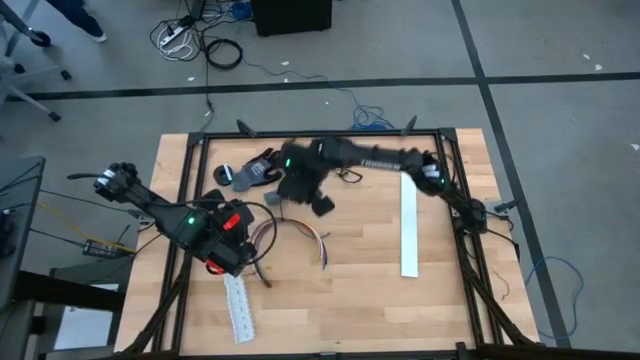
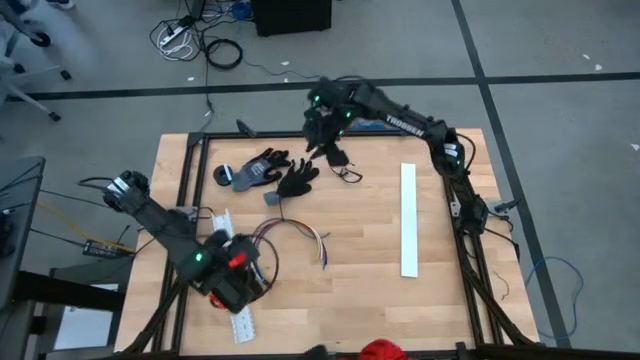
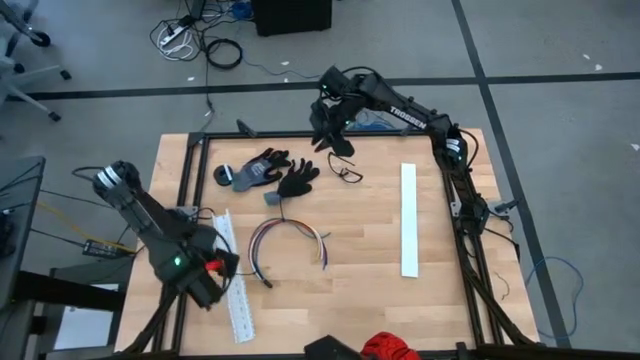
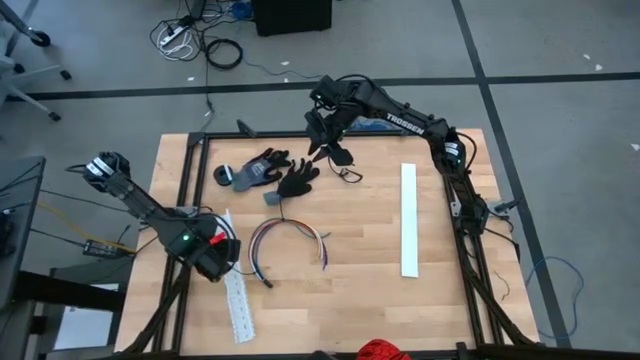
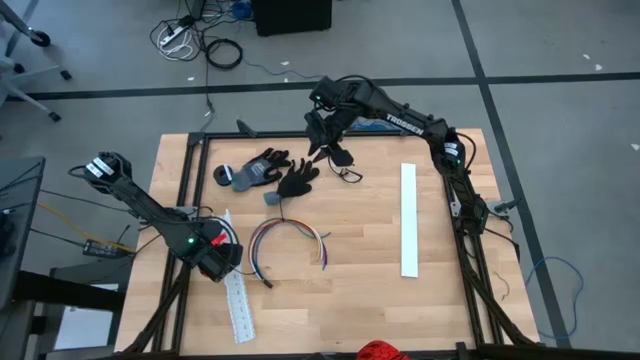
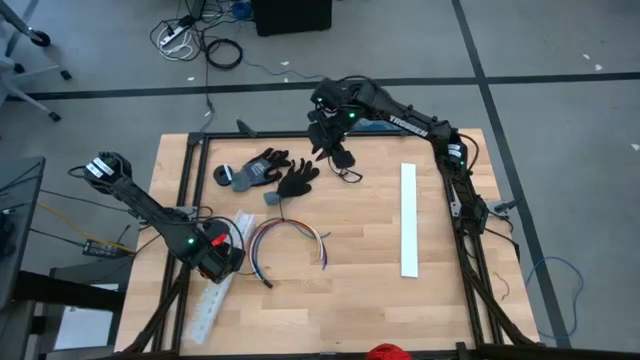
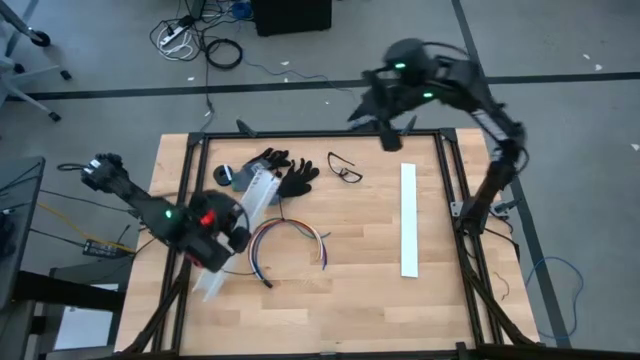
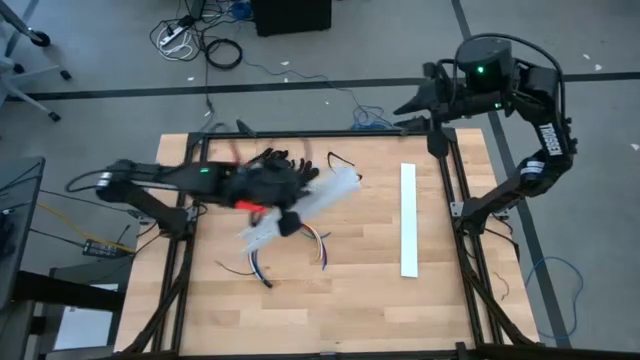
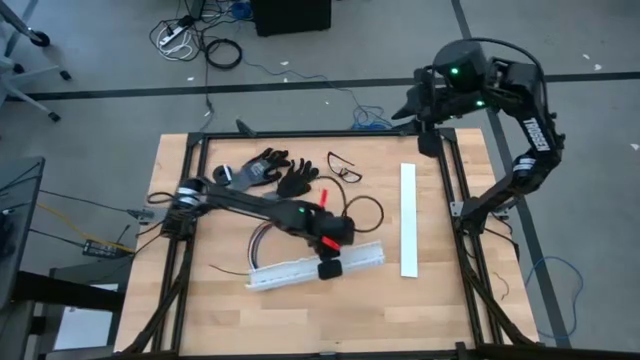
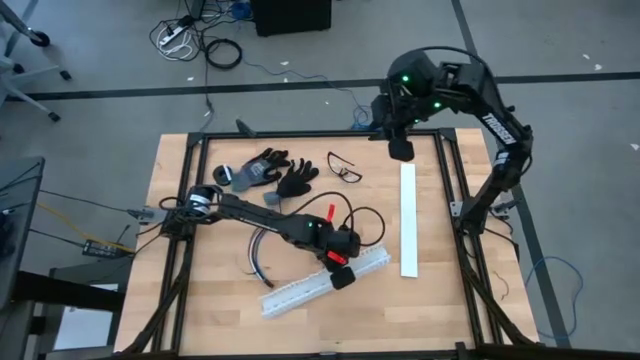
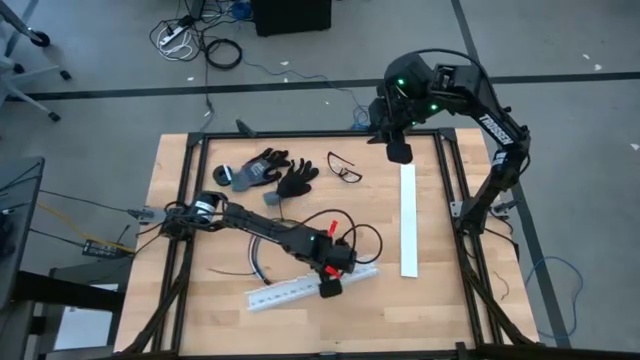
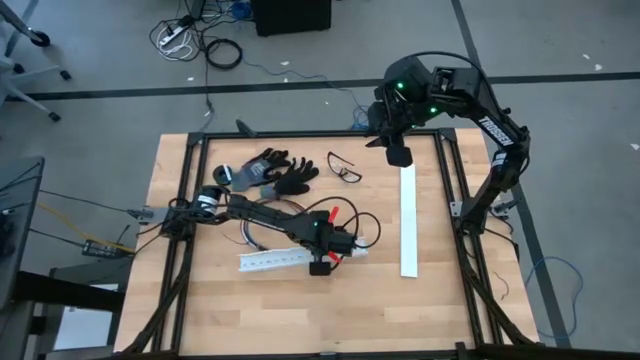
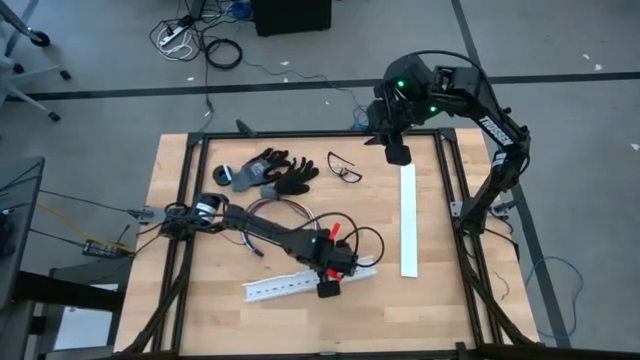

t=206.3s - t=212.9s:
Task: Ziptie cables
Move the white cable duct to the center of the table

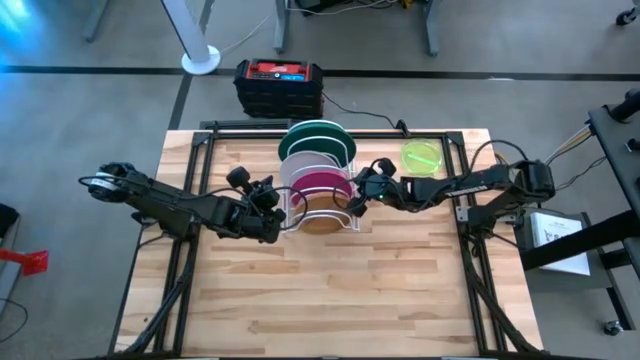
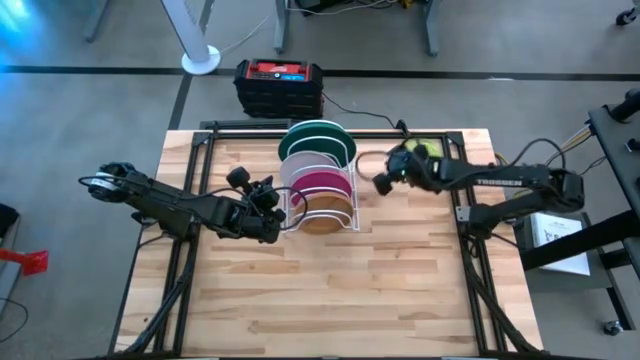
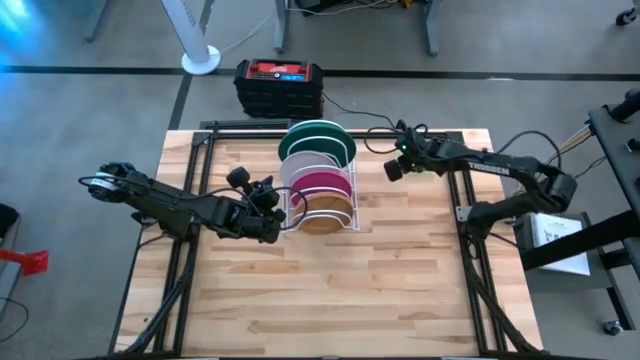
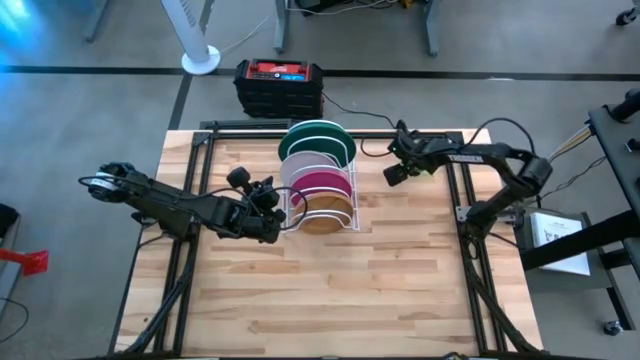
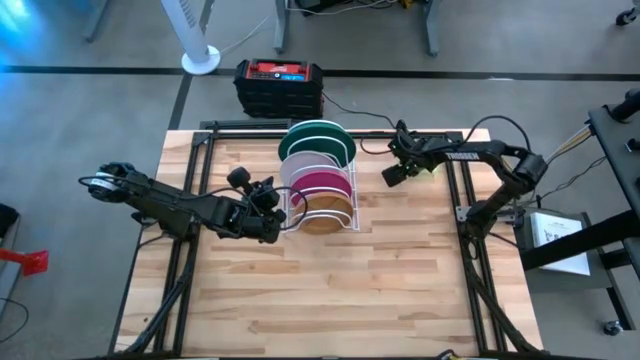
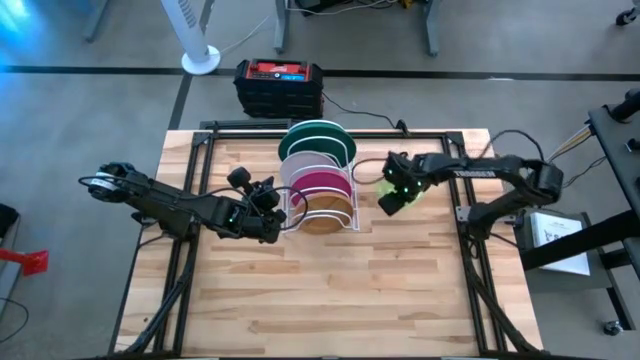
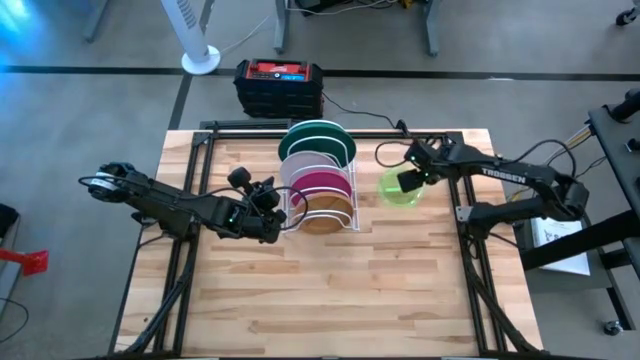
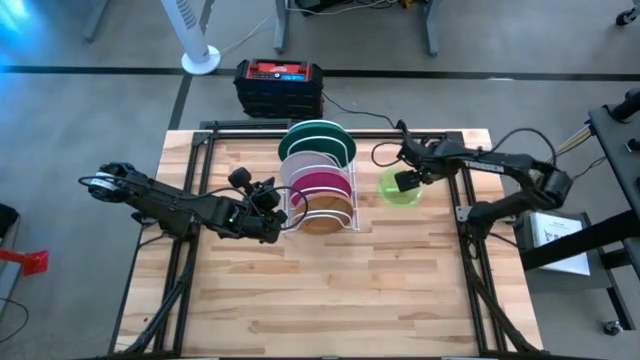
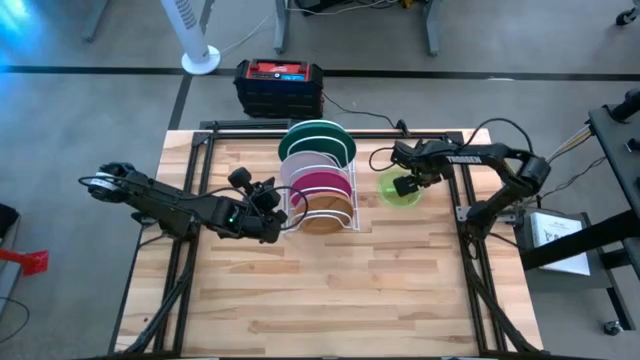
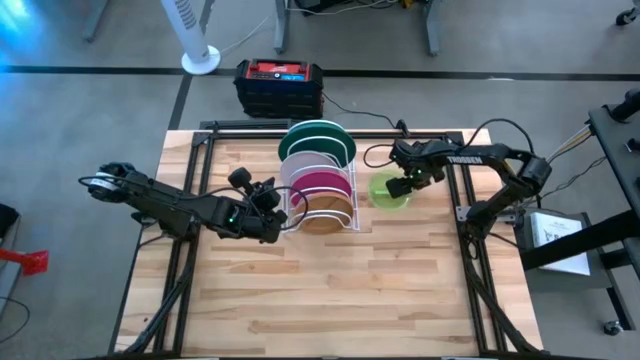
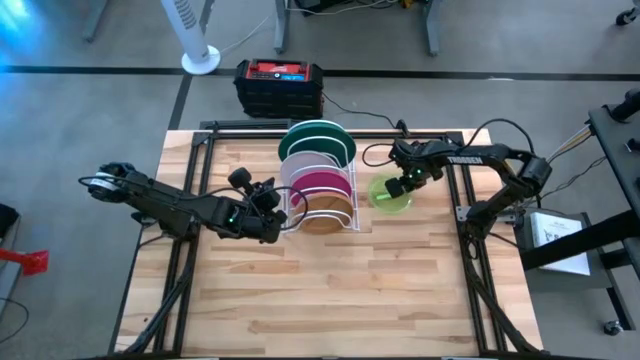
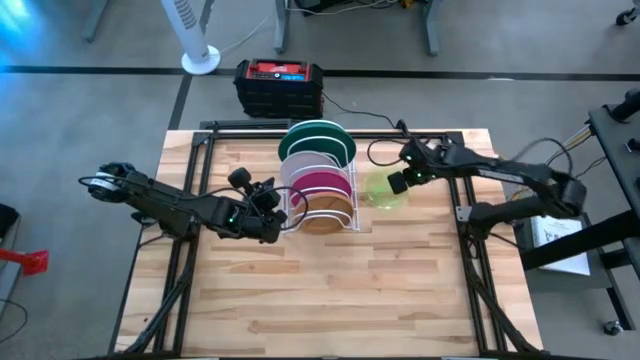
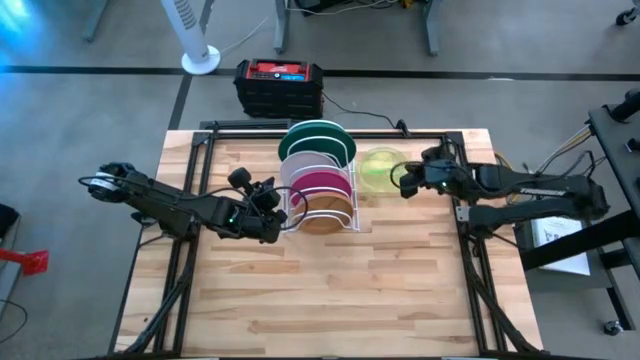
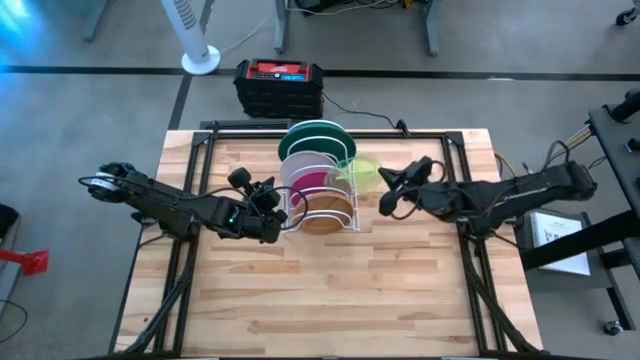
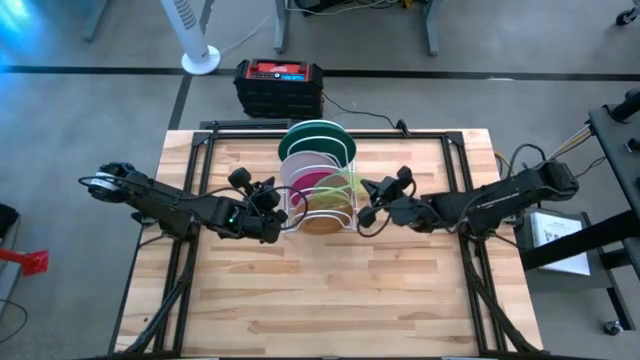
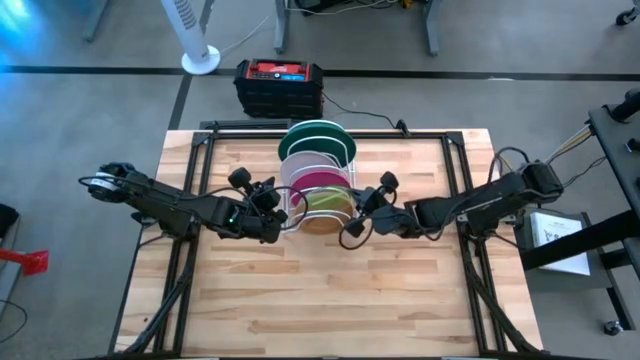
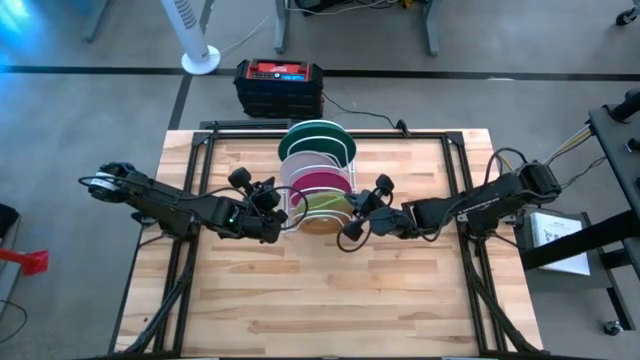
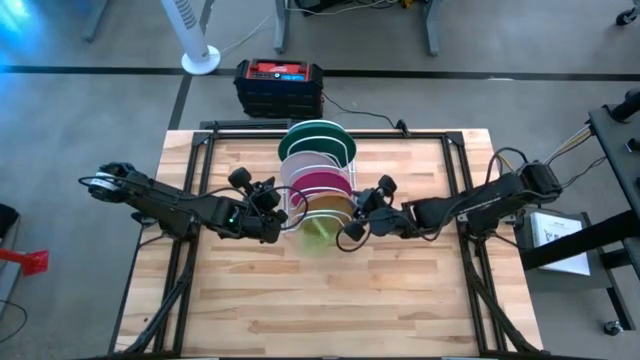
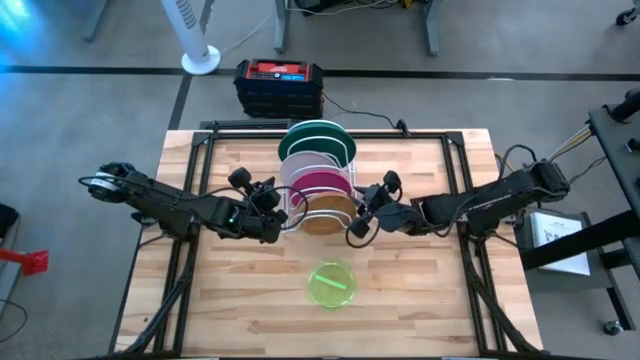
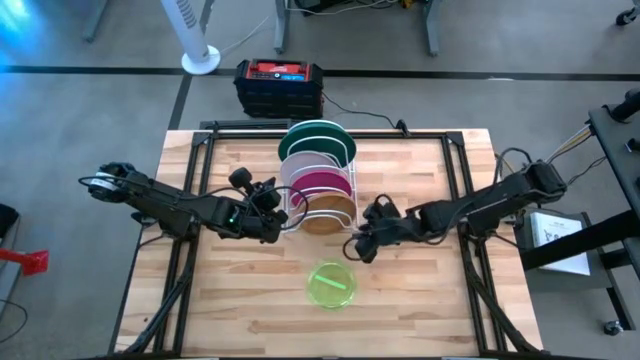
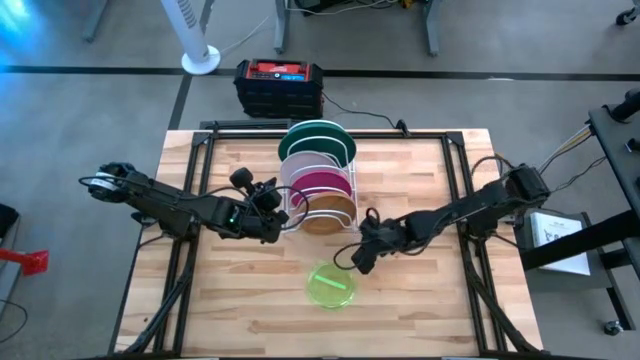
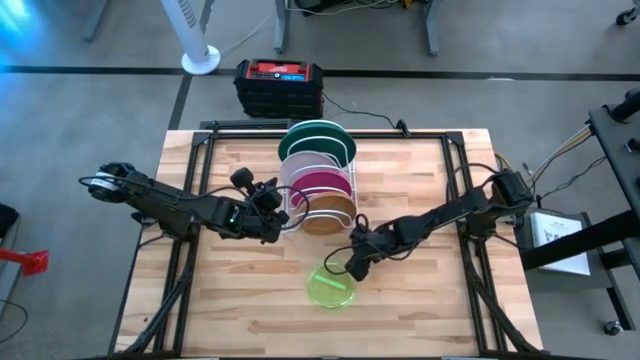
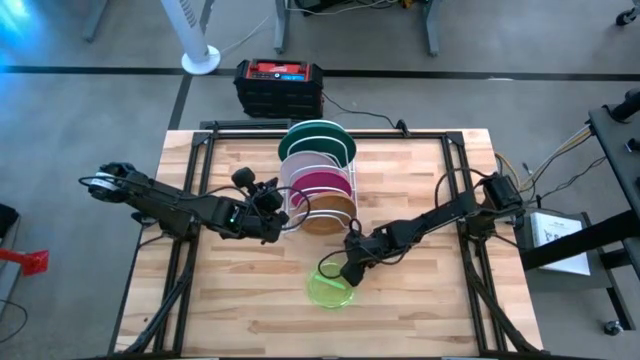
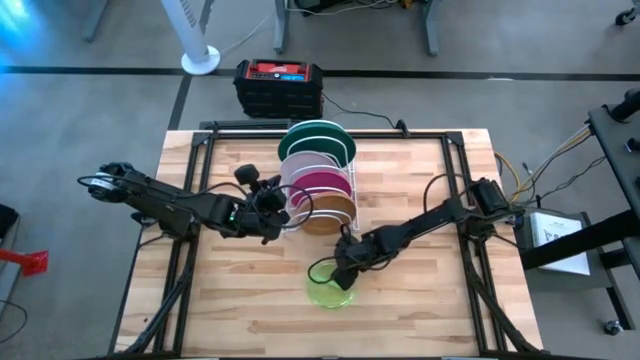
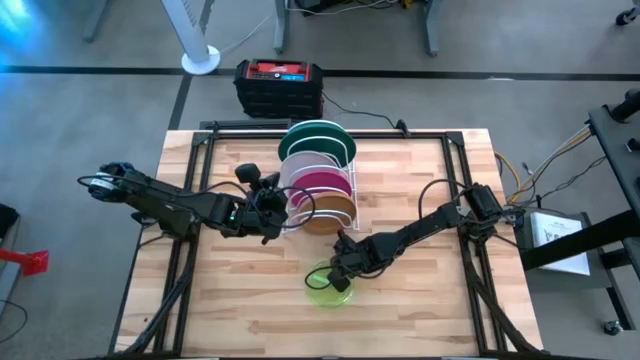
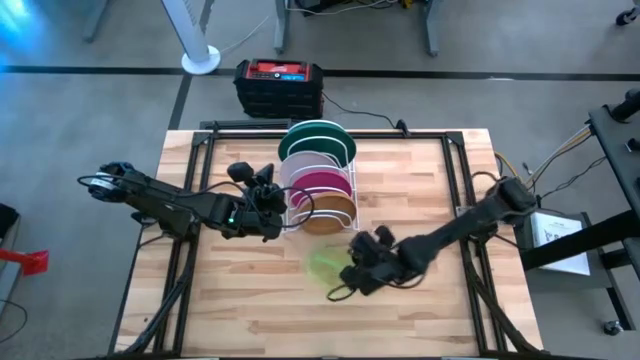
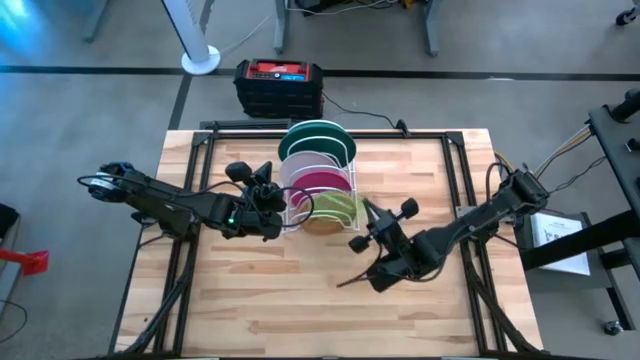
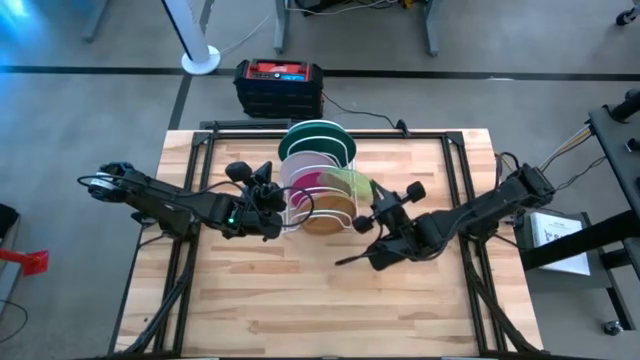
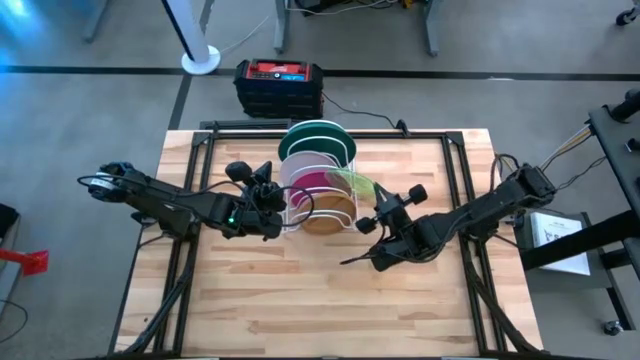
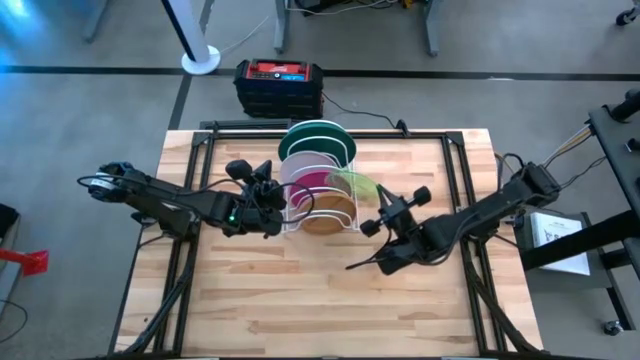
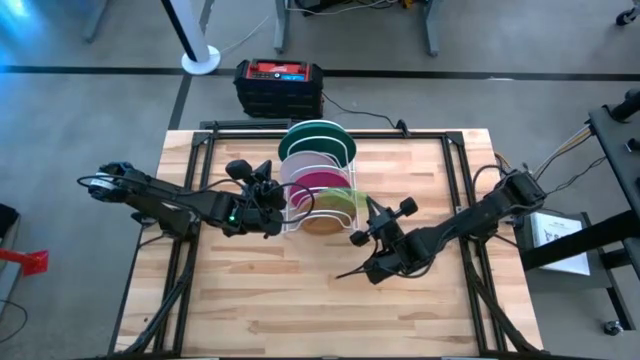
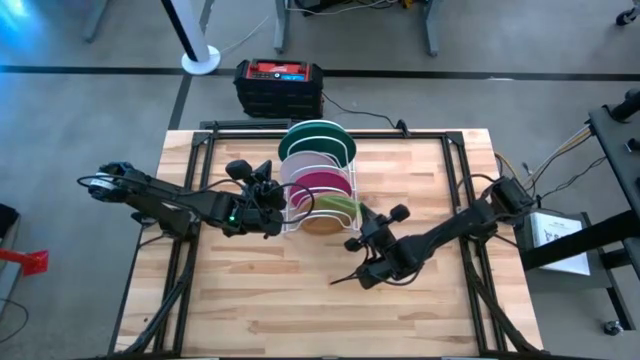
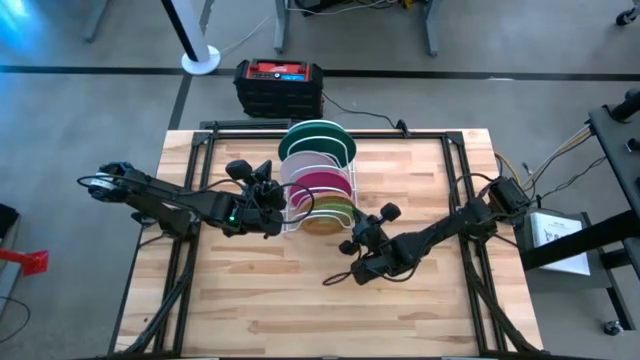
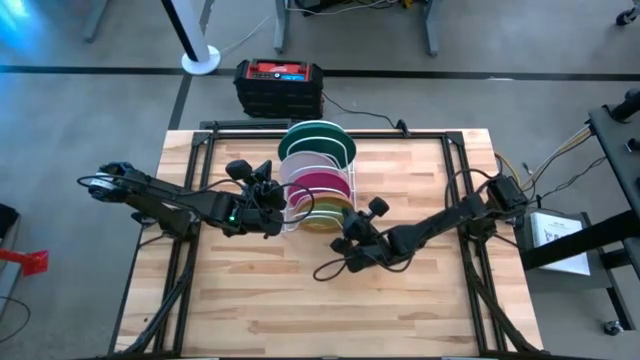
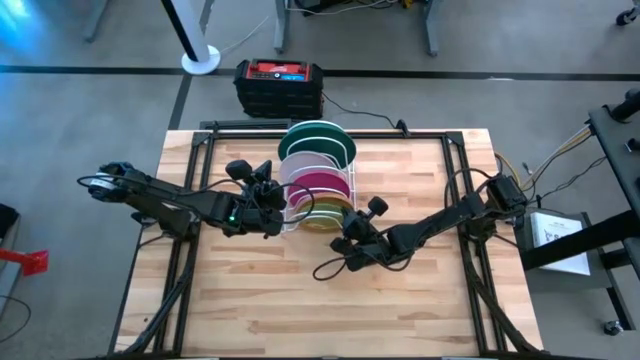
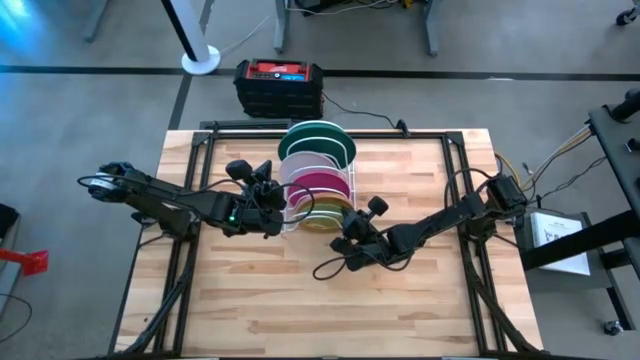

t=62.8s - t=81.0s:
Task: Sort dishes
Put the light green plate in the dish rack
